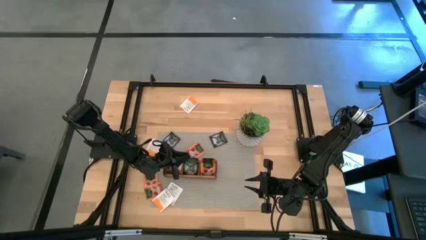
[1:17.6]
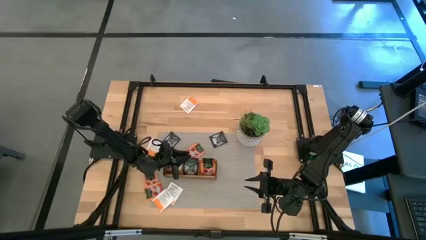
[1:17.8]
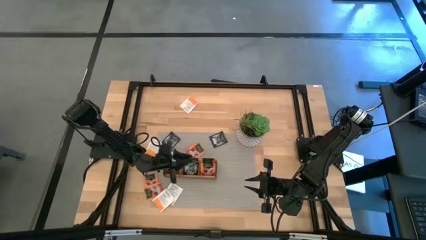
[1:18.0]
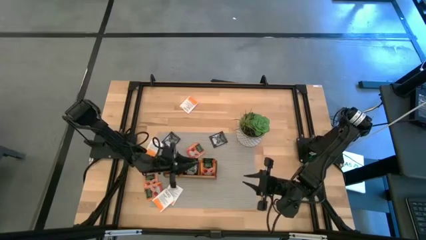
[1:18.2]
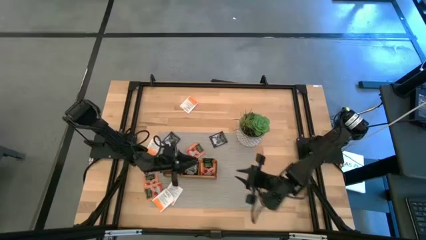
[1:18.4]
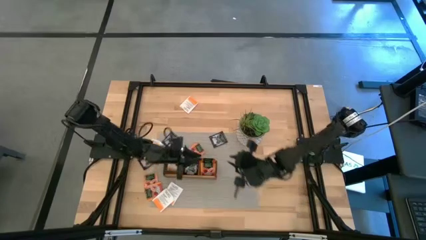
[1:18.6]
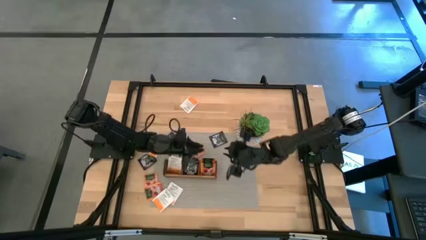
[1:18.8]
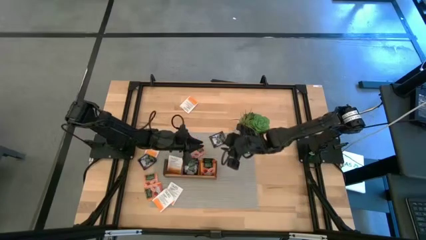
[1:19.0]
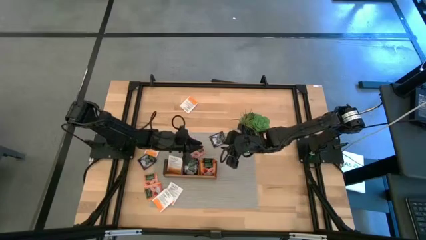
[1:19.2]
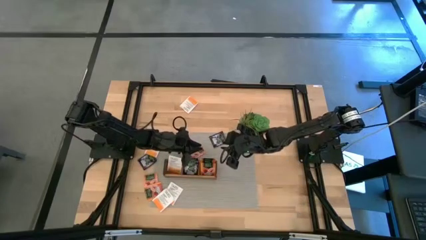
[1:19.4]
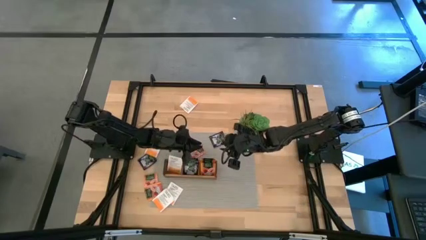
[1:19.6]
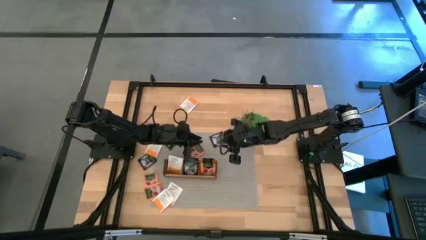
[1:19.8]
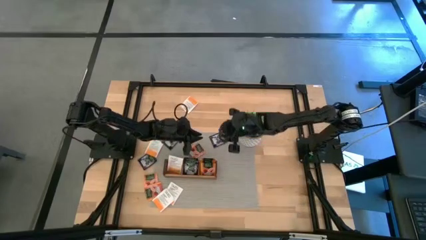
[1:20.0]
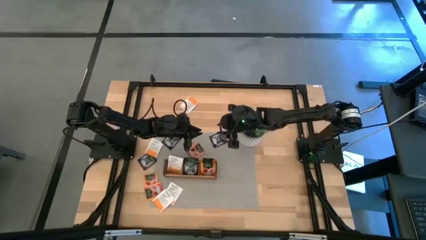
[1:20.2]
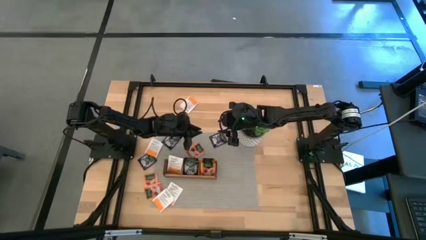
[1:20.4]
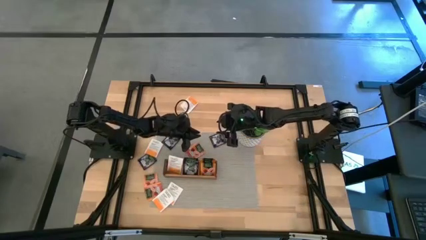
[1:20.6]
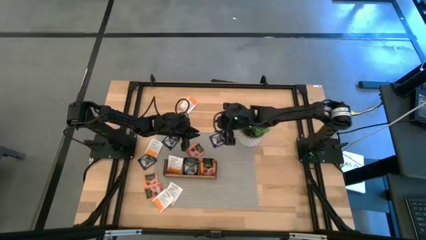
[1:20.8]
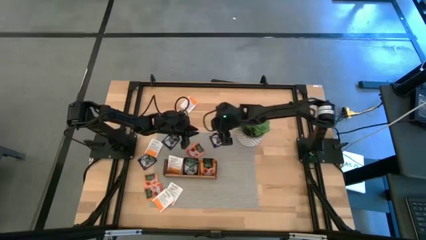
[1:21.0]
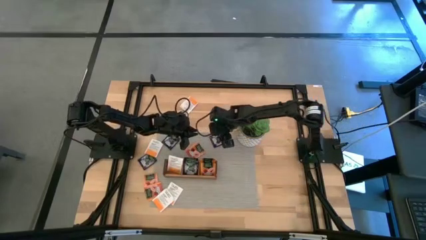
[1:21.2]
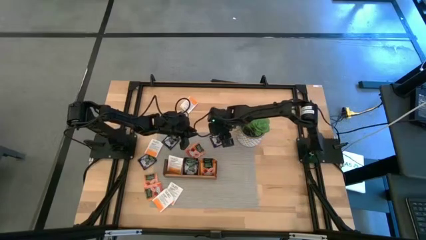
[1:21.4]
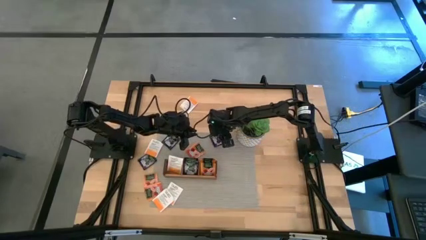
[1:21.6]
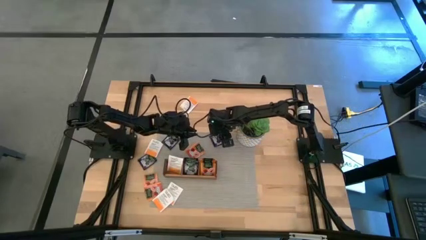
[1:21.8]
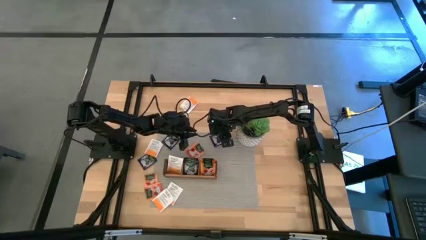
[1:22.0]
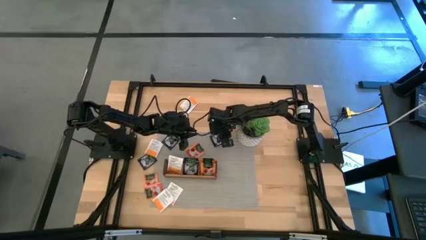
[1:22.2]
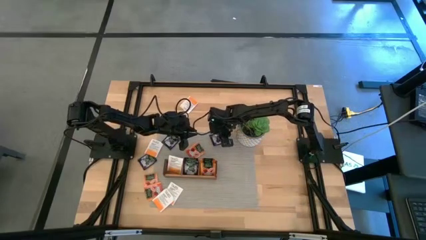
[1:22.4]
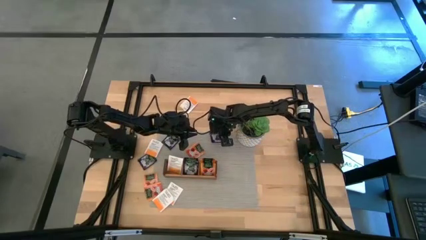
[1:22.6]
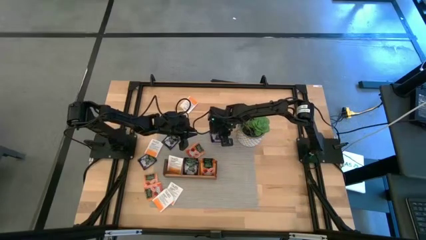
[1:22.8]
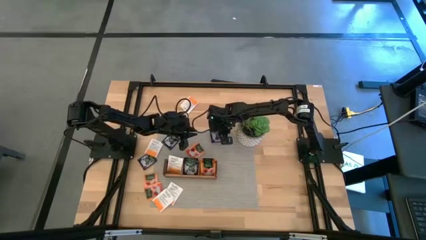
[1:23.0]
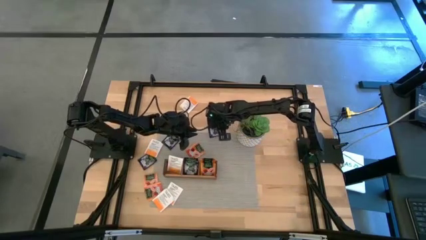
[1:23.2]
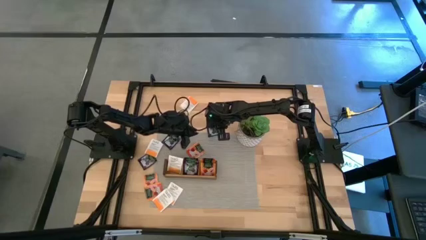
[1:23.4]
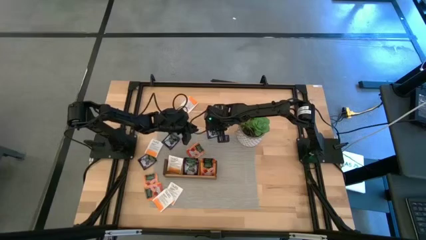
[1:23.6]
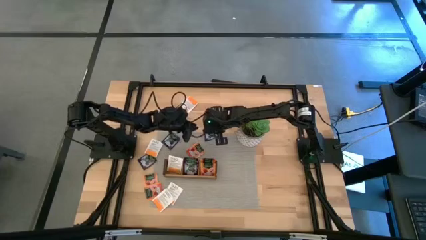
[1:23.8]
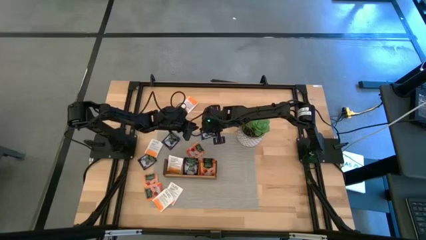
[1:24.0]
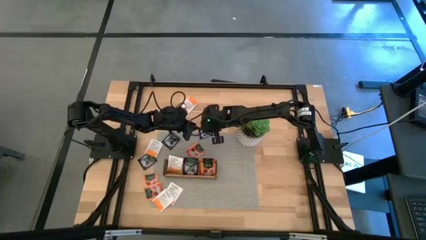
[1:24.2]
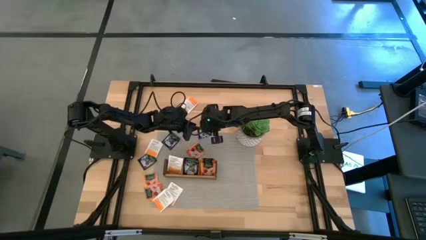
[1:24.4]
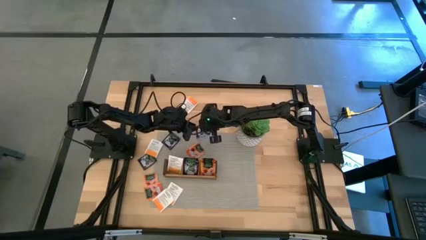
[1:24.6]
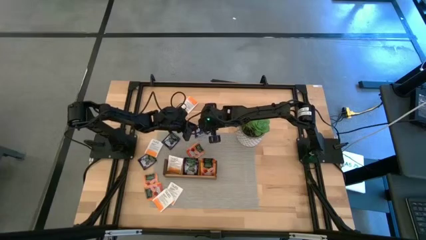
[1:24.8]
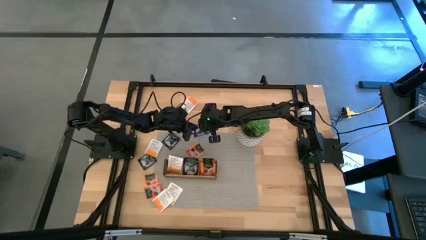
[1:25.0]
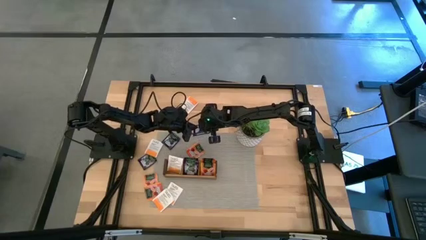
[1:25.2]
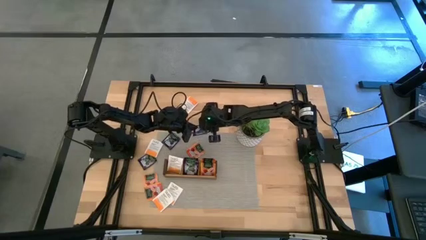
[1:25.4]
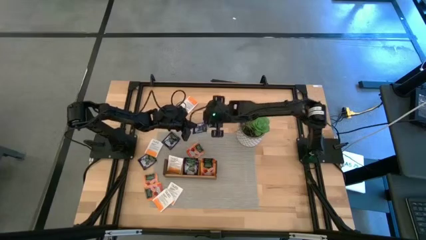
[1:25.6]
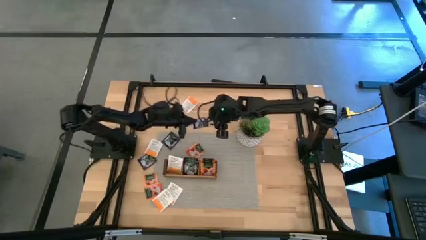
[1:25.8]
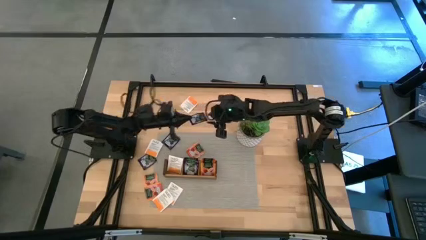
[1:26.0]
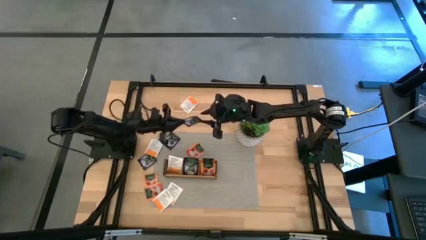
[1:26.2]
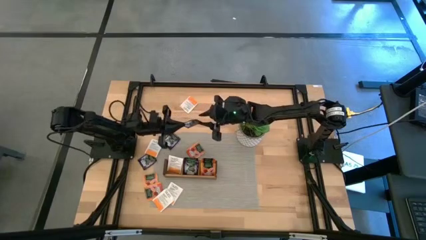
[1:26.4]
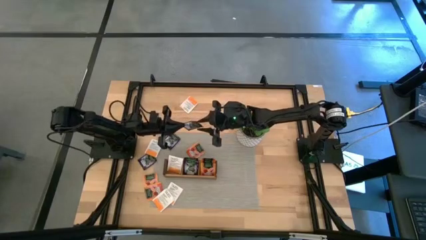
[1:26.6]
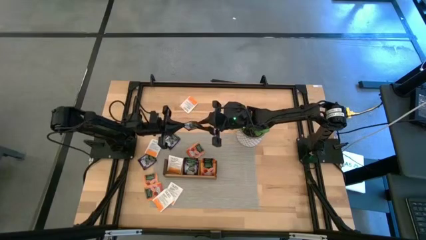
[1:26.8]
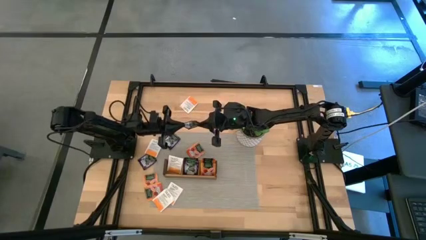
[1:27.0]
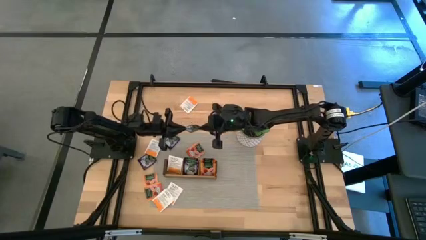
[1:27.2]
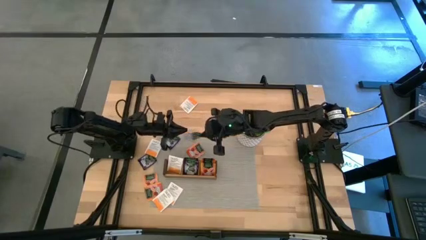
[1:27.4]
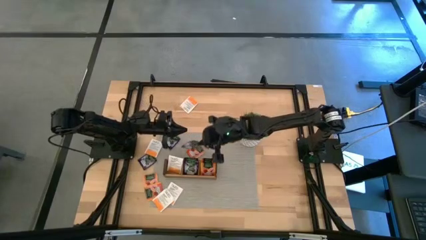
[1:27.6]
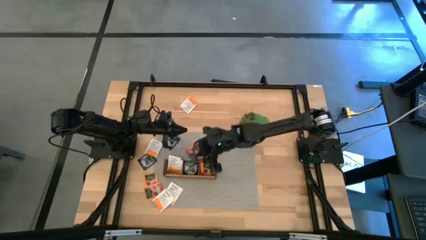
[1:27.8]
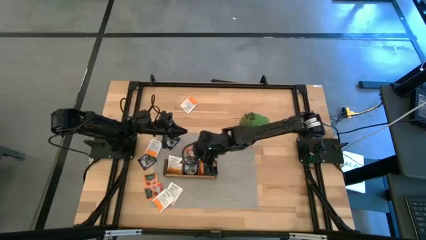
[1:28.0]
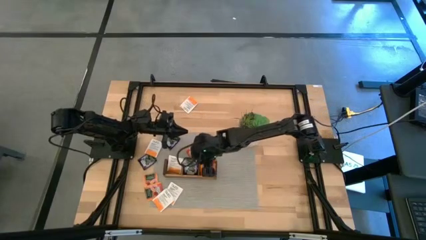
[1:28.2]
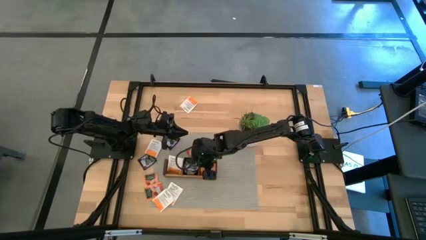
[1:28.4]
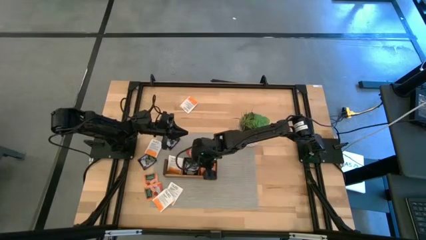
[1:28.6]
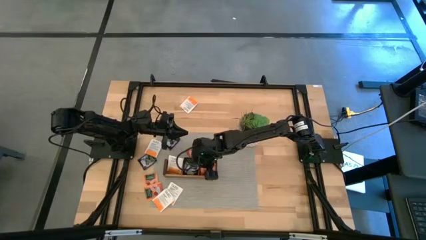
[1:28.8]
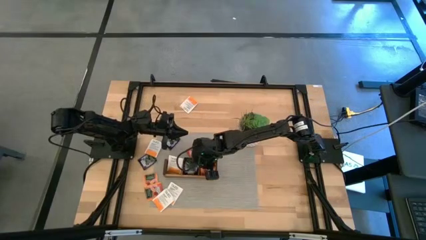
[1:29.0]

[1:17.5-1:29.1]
Task: Pick & Place Tea
Put the violet tea bag into the middle section of the wooden organizer

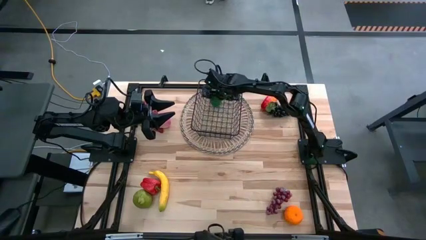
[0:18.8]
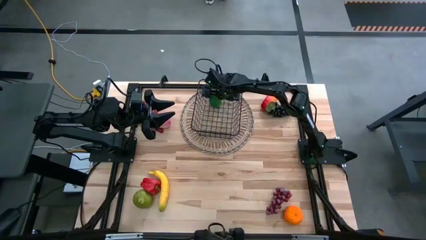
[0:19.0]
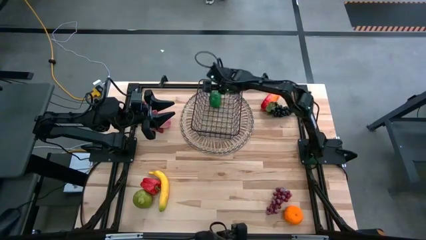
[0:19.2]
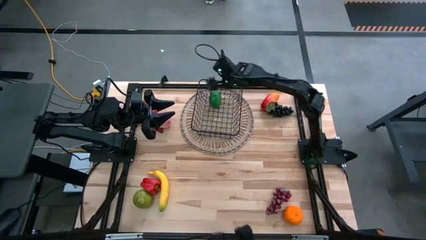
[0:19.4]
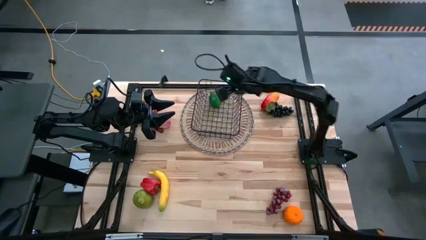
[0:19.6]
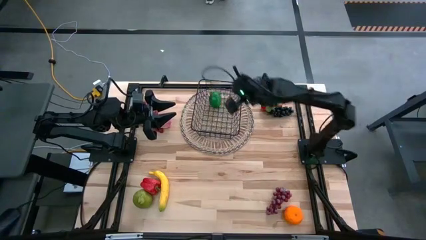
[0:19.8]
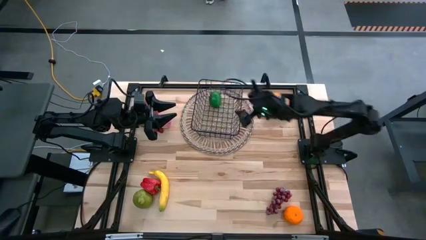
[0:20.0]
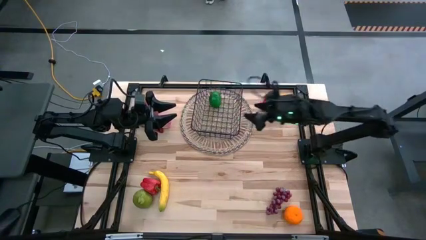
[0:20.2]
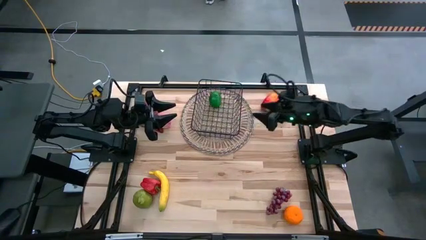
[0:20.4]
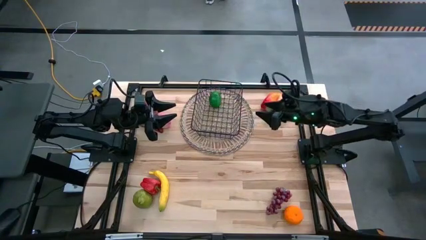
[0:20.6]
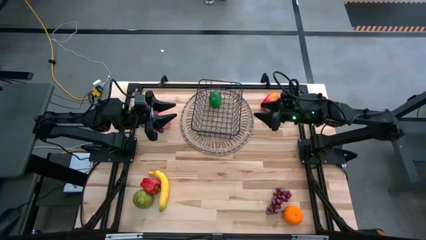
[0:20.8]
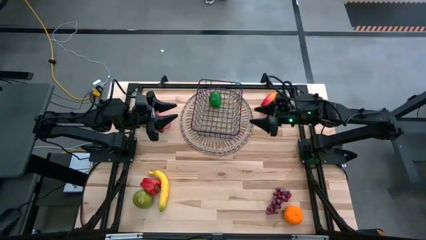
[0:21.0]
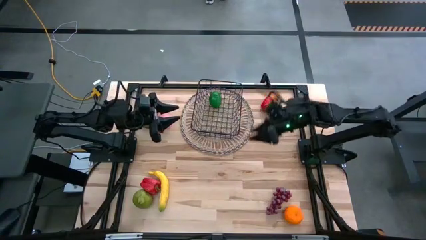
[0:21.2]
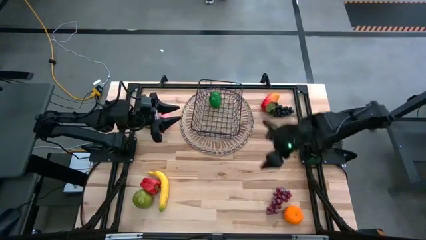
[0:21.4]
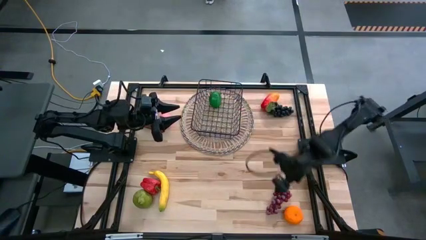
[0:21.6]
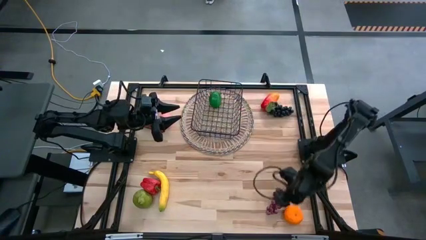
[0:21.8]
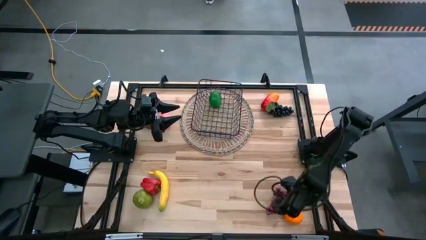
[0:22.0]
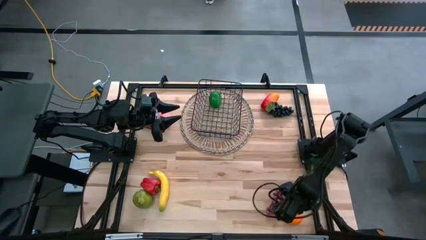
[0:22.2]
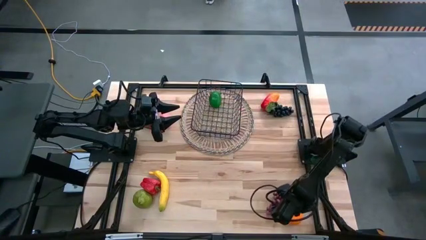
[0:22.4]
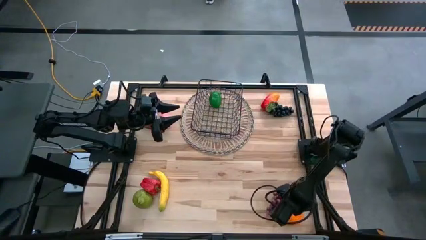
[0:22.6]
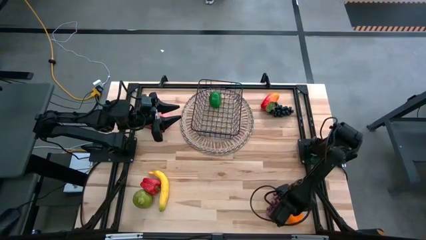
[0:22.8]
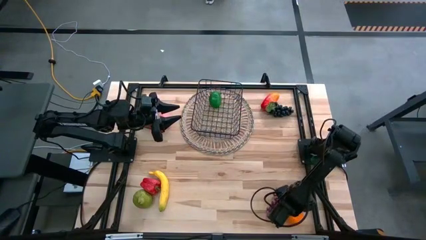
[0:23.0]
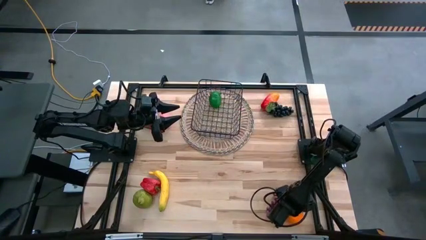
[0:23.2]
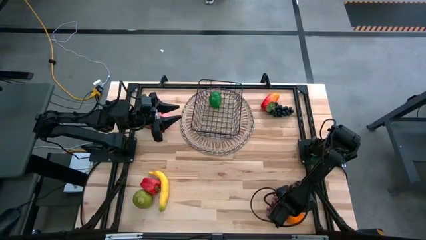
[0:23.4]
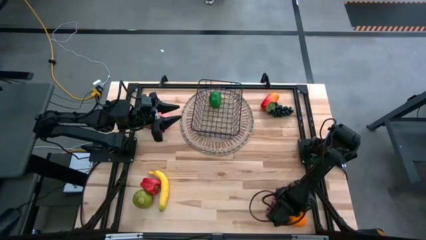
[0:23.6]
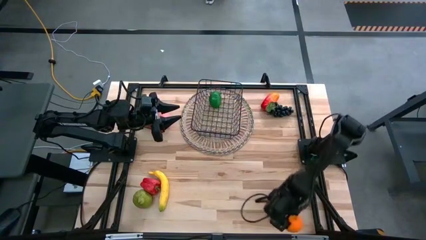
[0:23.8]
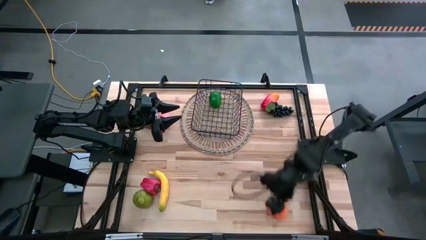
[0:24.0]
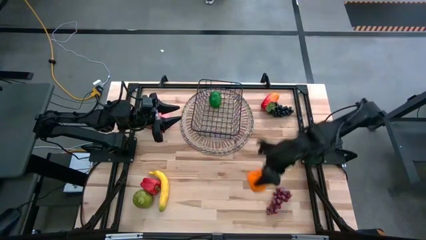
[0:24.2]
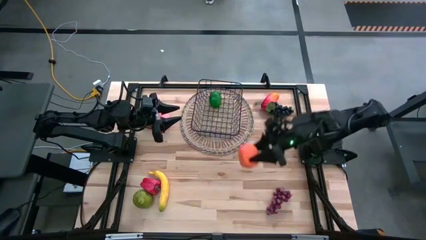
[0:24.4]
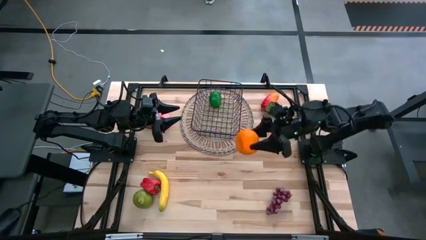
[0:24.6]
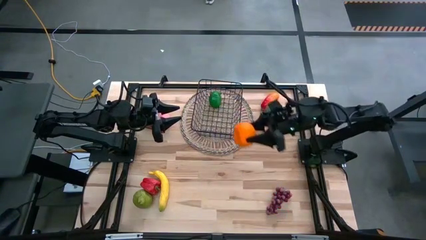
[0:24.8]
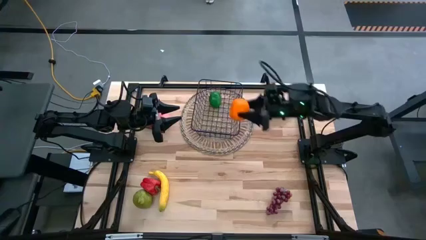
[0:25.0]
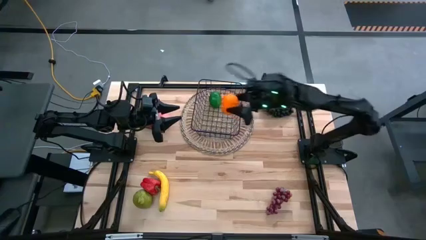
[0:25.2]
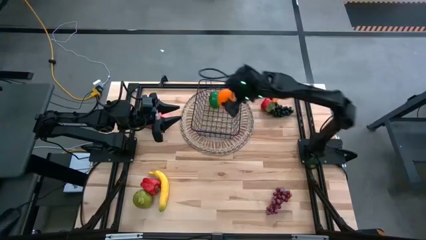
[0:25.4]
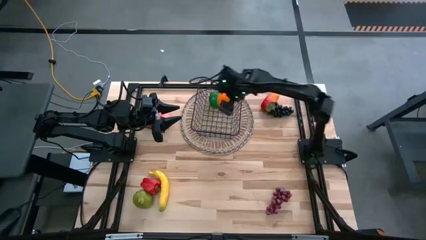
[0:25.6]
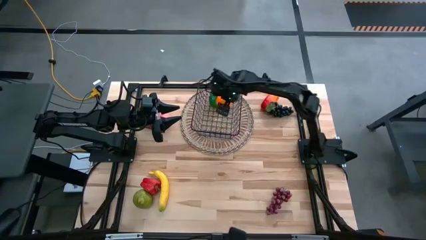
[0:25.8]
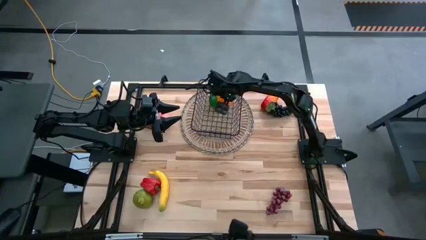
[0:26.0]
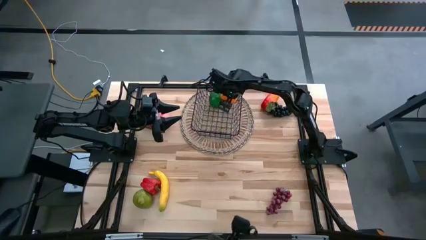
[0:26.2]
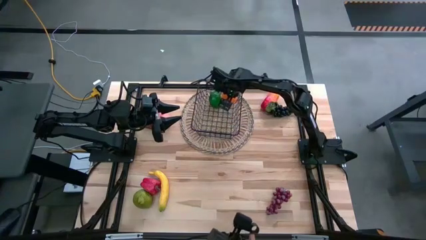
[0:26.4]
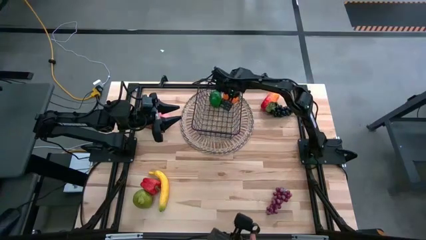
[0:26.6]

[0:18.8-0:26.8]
Task: Build produce basket
Put the orange into the black wire basket
